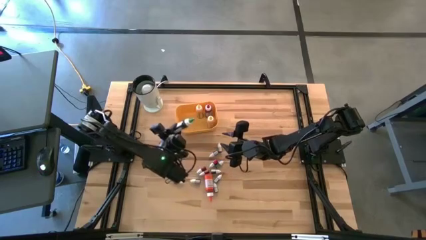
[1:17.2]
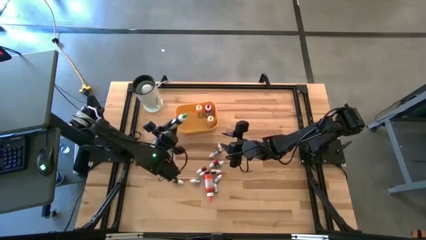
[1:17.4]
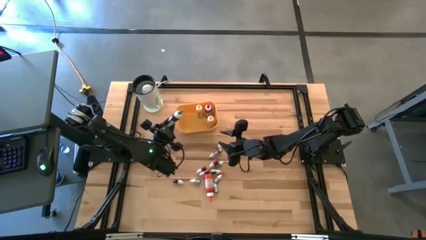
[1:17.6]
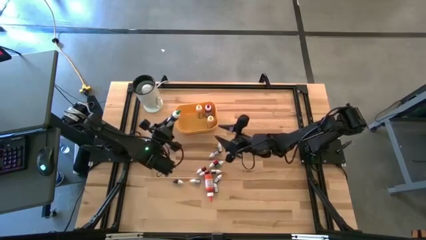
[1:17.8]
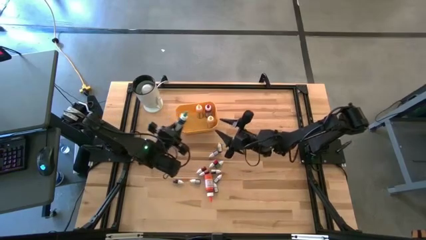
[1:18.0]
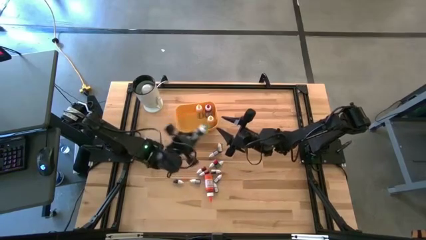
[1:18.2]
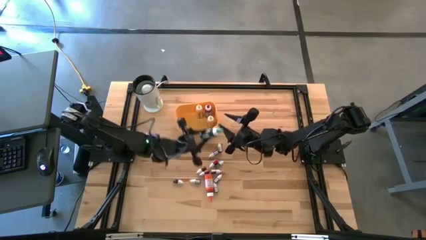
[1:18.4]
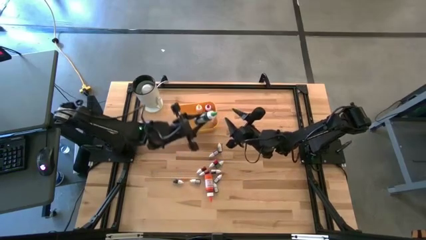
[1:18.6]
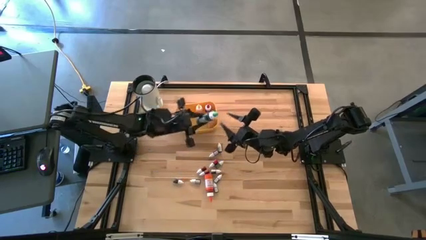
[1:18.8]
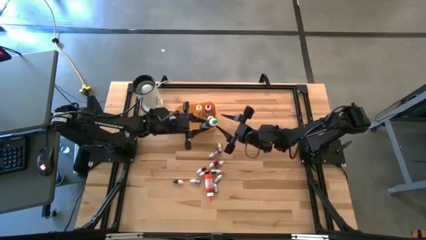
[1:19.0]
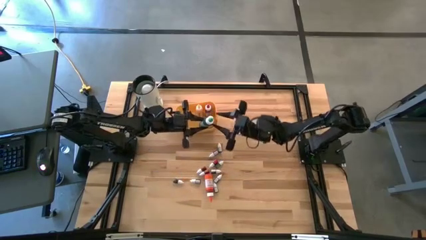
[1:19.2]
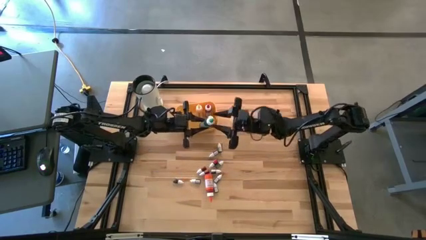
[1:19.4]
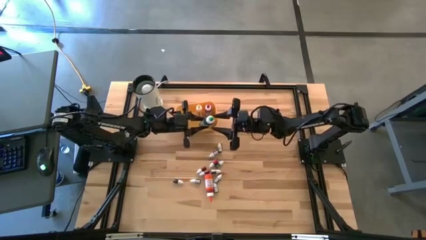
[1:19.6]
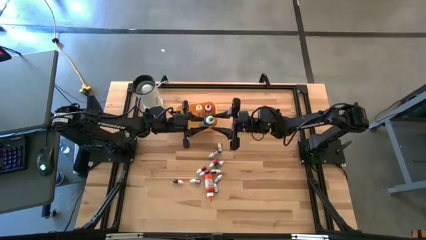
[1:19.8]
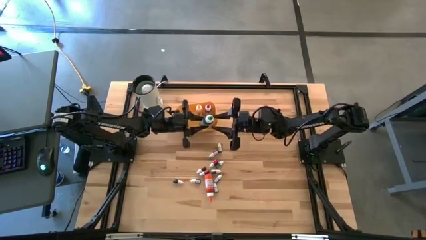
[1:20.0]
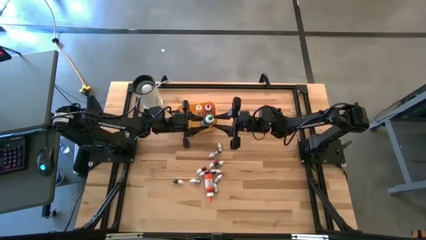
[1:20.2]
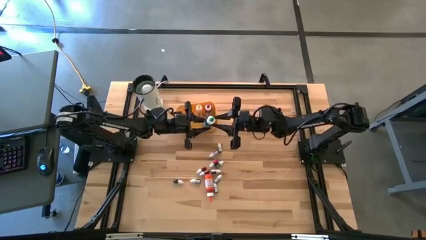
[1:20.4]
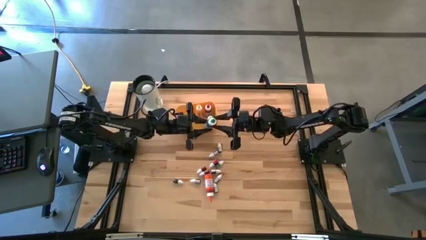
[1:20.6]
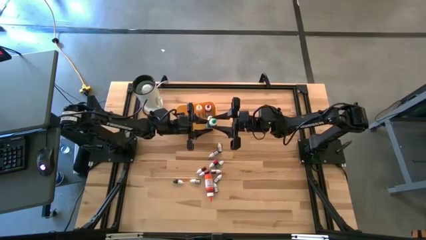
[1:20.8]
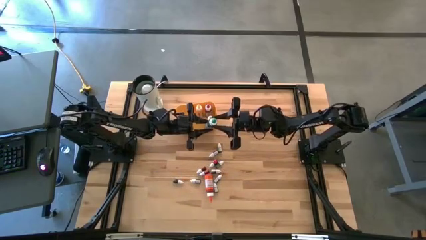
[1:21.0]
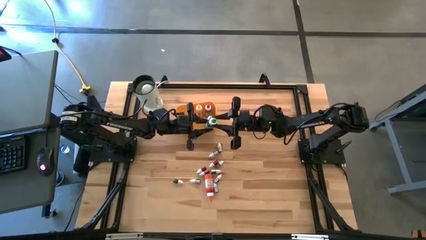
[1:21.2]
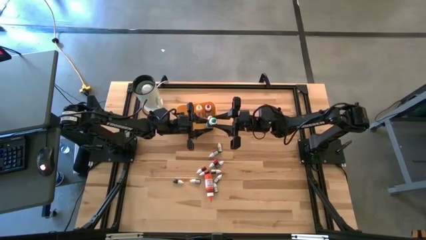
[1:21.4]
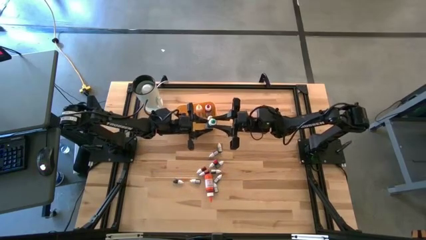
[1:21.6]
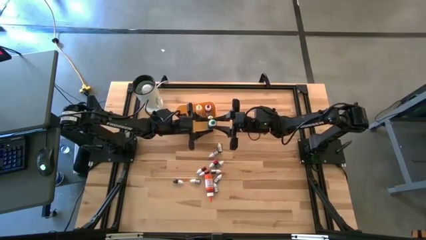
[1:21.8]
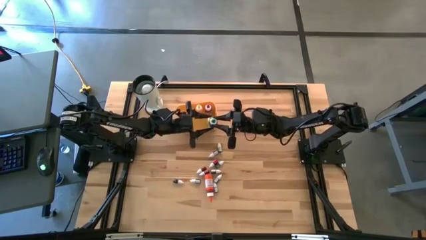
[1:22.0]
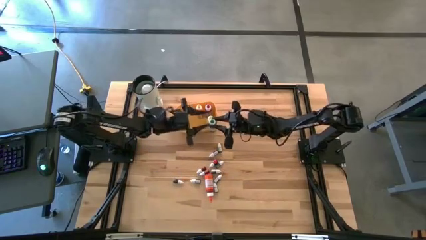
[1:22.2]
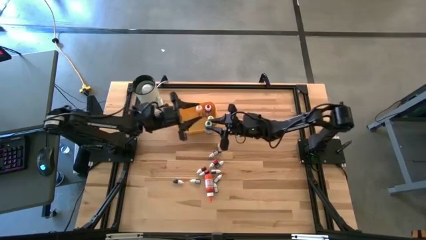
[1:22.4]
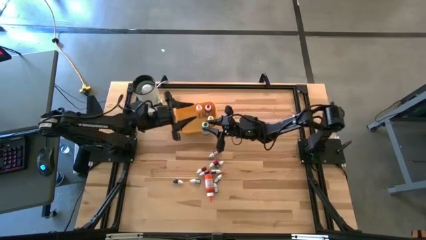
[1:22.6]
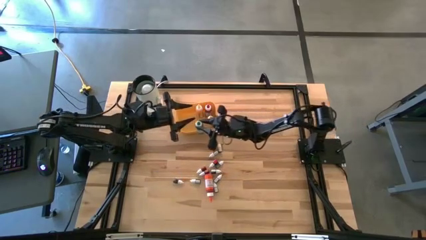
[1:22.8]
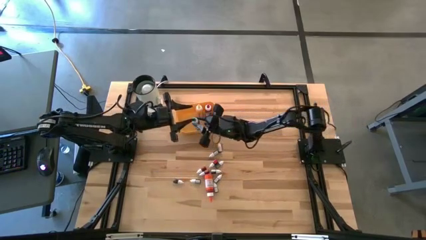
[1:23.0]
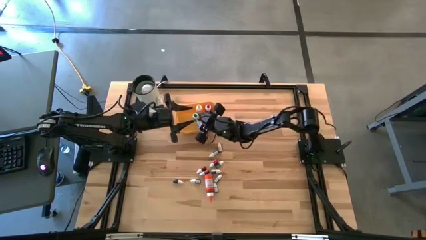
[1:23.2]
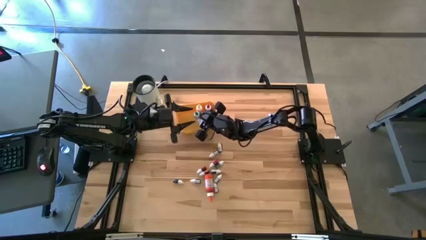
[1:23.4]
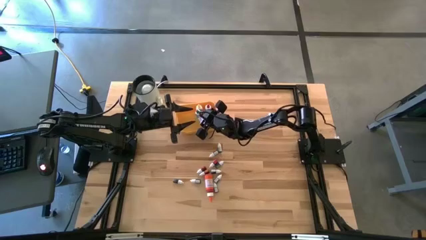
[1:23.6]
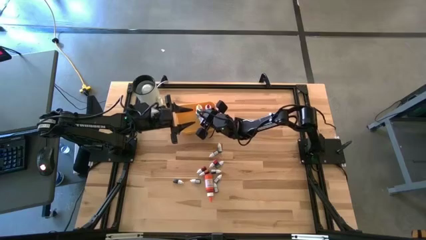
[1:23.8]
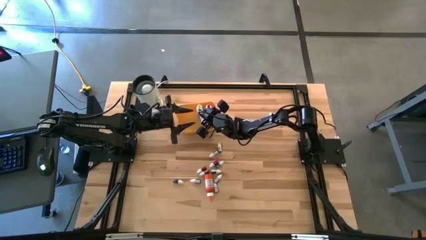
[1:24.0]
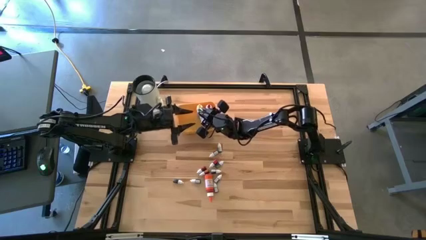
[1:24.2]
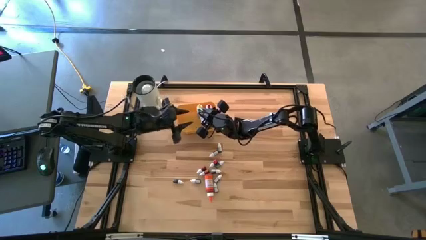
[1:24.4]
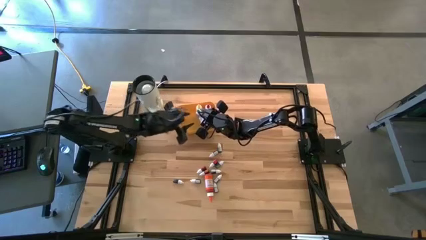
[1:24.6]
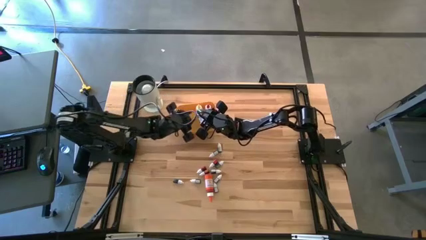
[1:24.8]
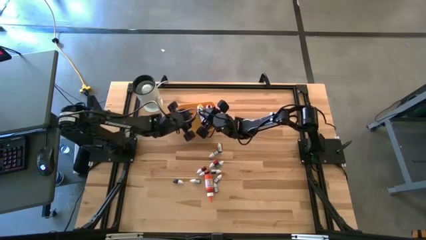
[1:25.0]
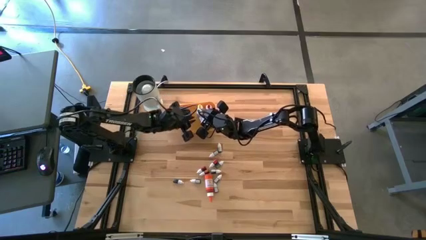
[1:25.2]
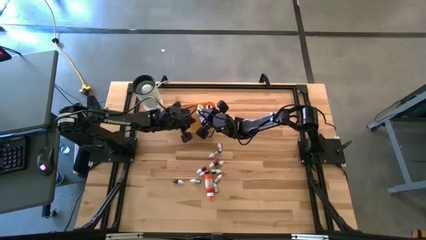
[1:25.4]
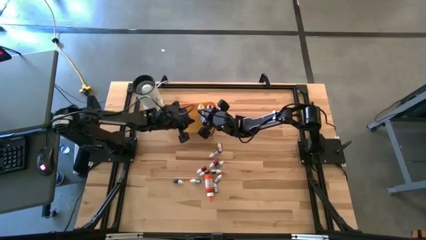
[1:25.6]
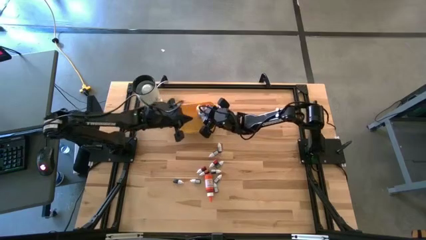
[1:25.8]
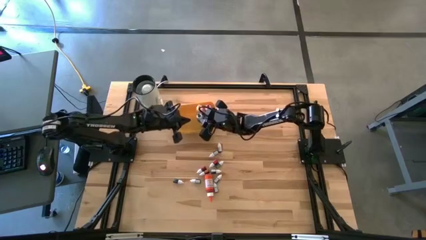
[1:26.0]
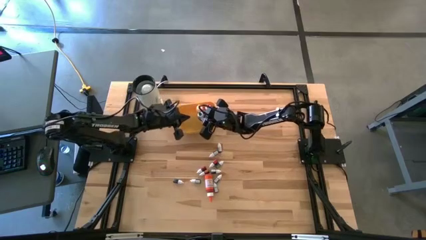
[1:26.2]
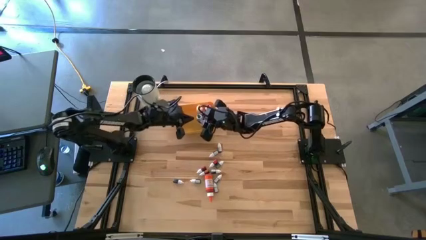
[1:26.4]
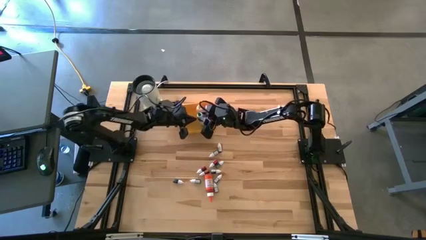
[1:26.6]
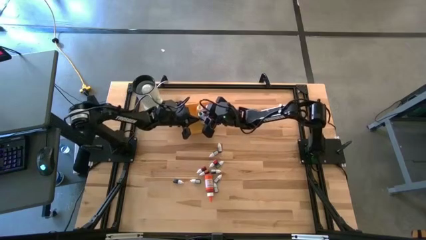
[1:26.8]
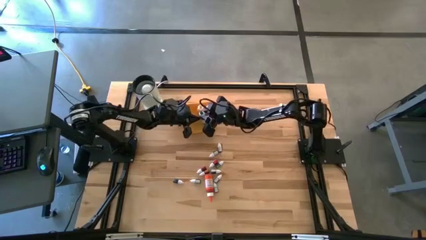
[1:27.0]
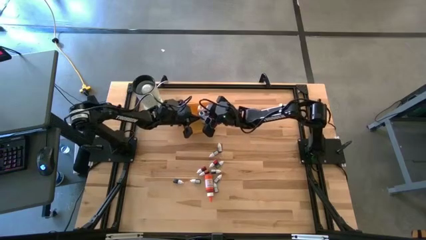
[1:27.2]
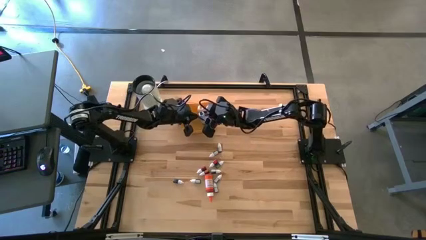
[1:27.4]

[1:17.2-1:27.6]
Task: Pick & Place food coloring
Put the large green food coloring bottle into the yellow bin

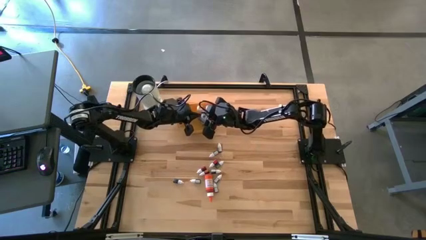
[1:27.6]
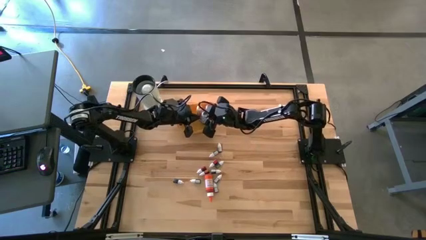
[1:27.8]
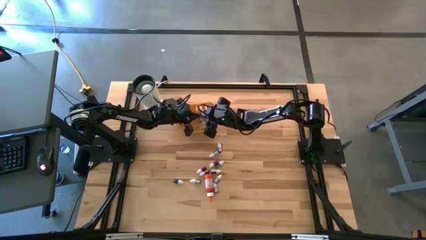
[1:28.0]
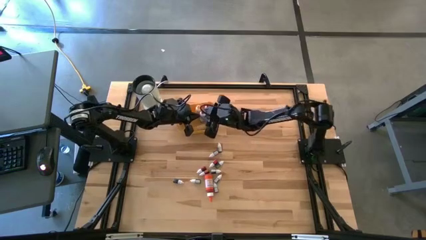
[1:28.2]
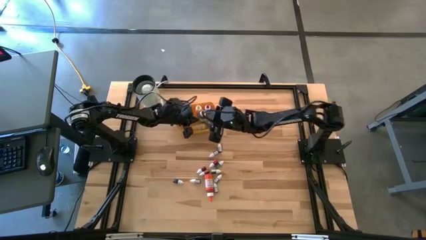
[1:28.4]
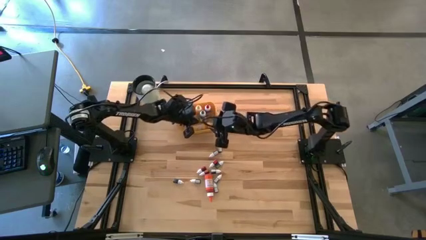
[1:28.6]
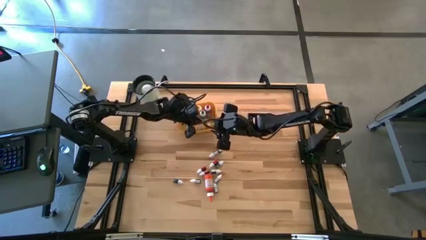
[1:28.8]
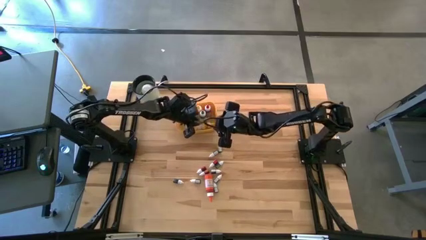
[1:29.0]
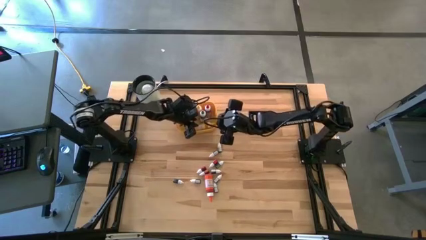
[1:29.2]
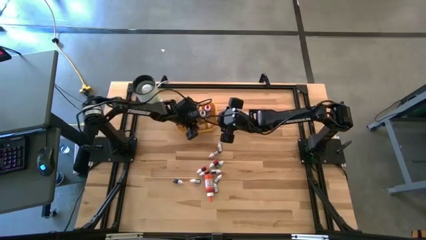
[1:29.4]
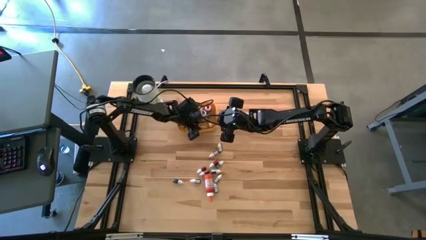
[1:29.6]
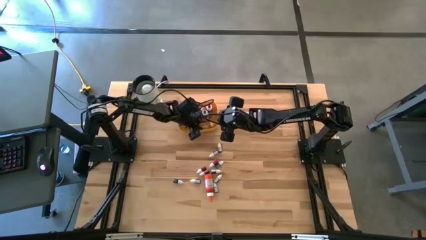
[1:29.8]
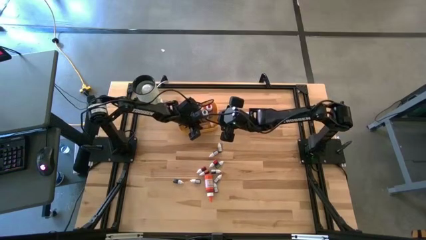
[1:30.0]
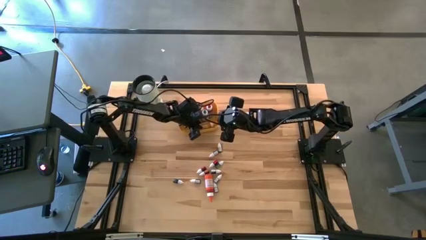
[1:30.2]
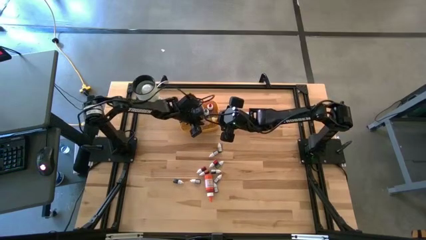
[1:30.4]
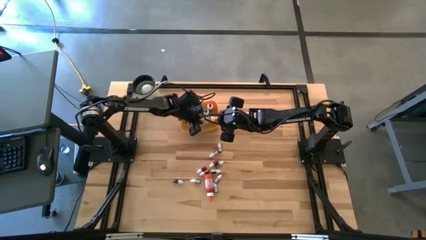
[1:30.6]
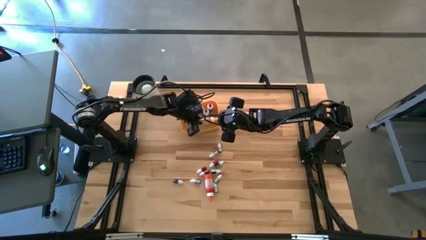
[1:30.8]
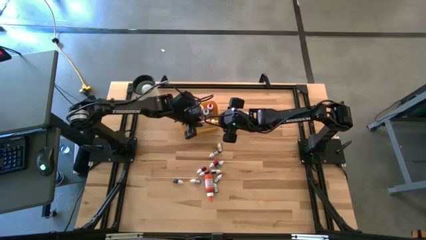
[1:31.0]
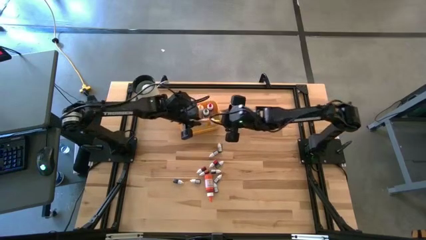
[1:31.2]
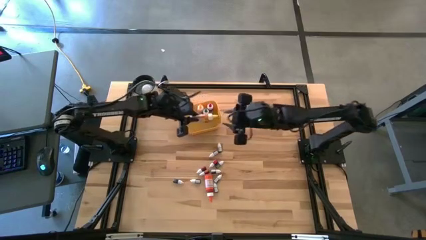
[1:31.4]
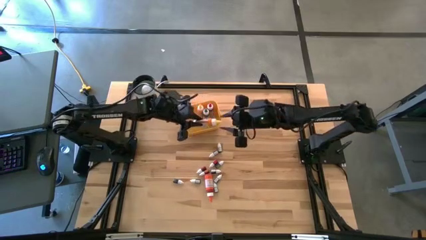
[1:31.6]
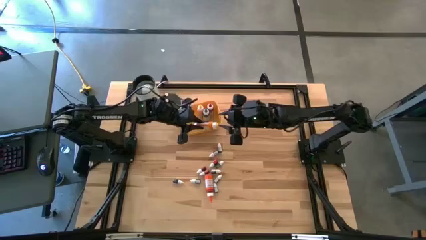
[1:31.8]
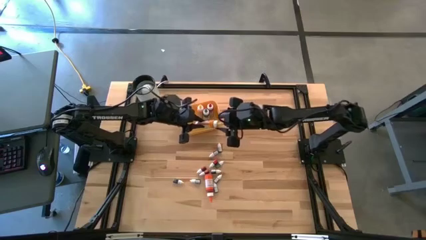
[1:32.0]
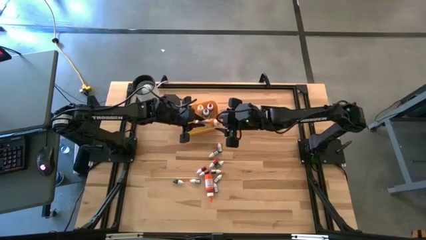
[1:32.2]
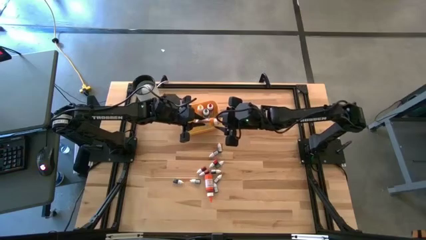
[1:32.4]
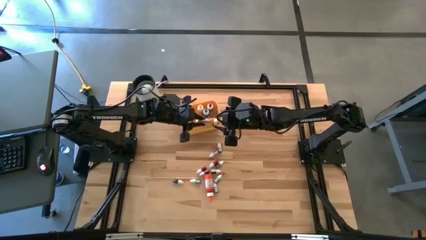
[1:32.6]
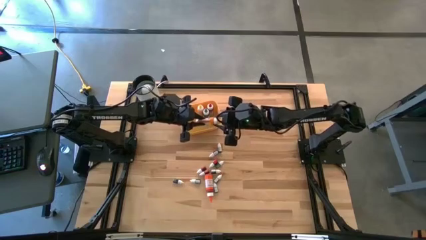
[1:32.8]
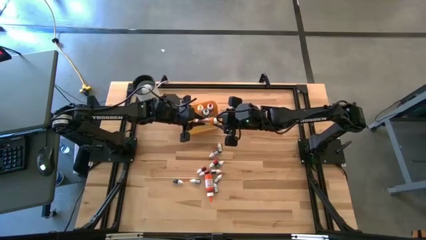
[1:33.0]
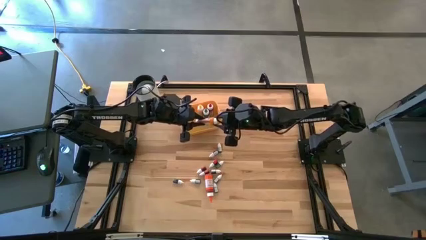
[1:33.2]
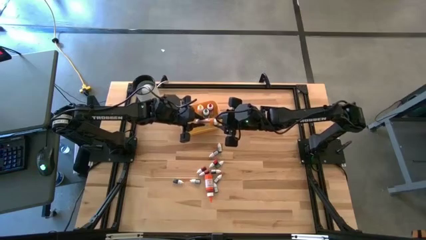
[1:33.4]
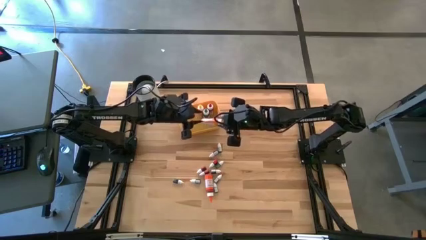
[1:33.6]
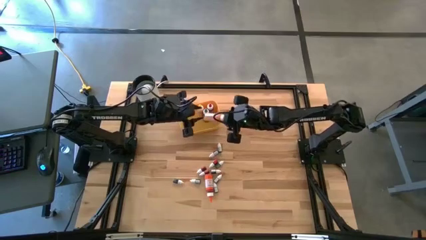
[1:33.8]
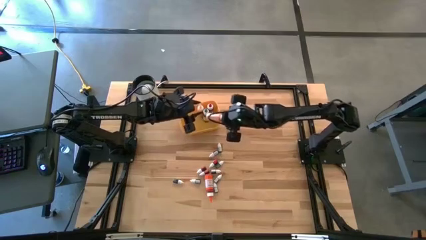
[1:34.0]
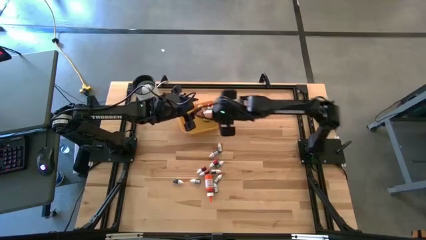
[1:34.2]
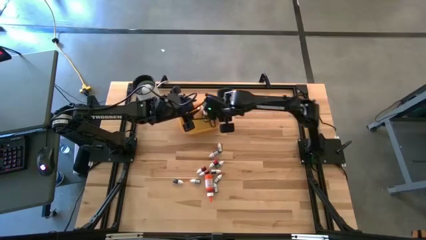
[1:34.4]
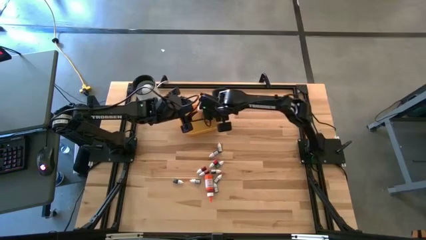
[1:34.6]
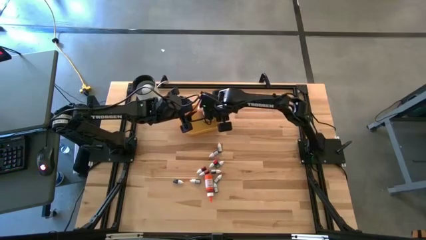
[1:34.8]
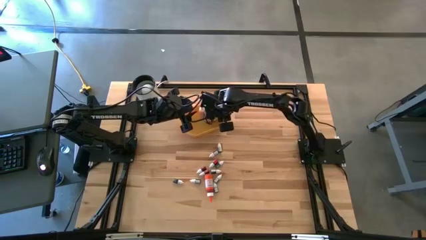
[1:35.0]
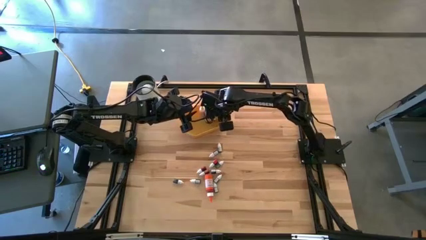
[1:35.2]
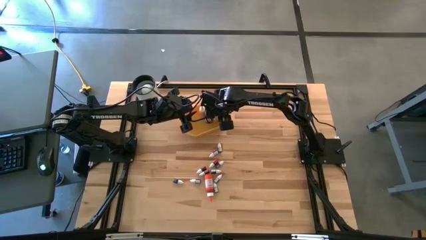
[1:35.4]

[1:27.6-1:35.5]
Adjust the large yellow food coloring bottle in the yellow bin
